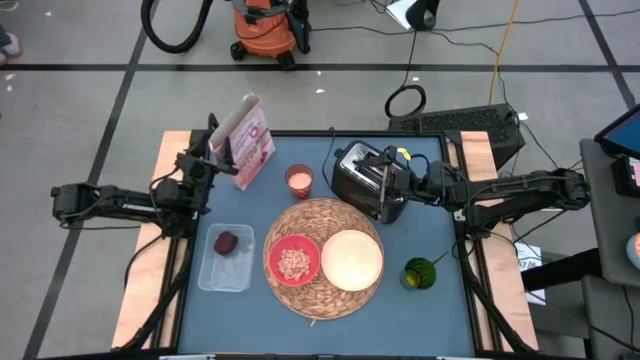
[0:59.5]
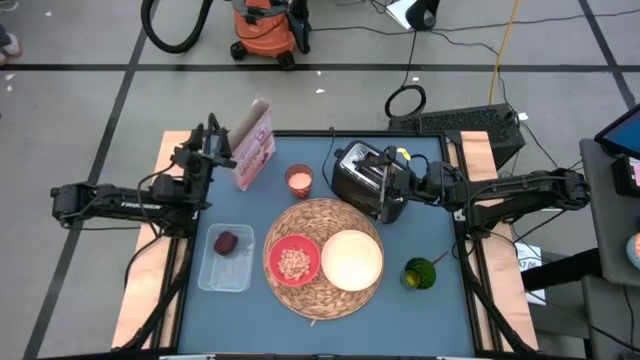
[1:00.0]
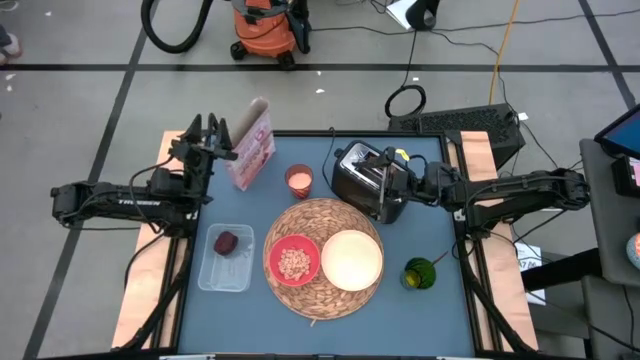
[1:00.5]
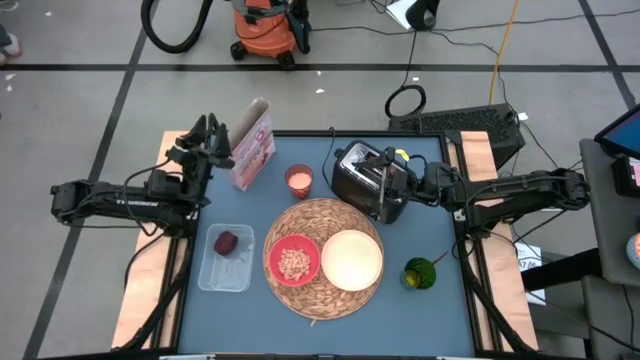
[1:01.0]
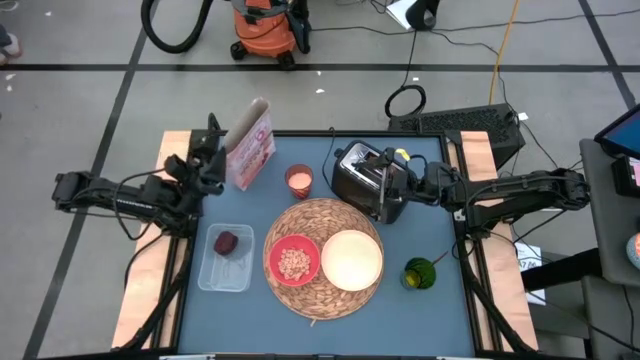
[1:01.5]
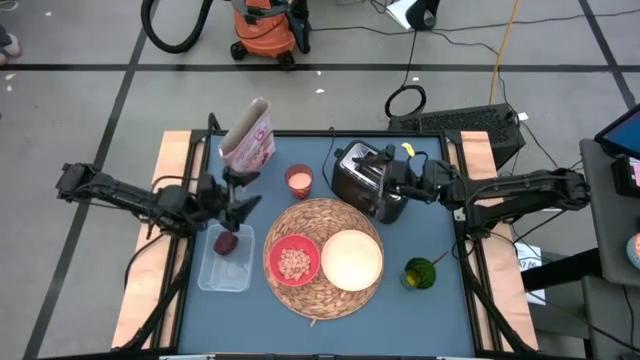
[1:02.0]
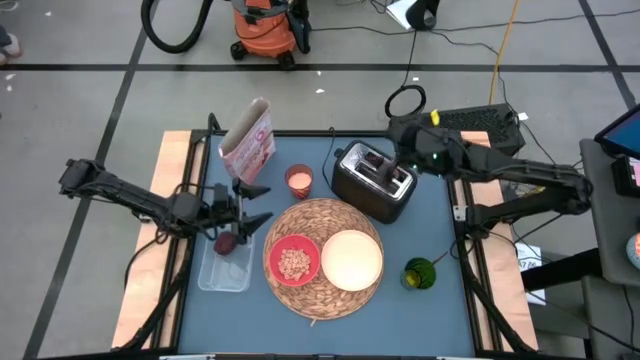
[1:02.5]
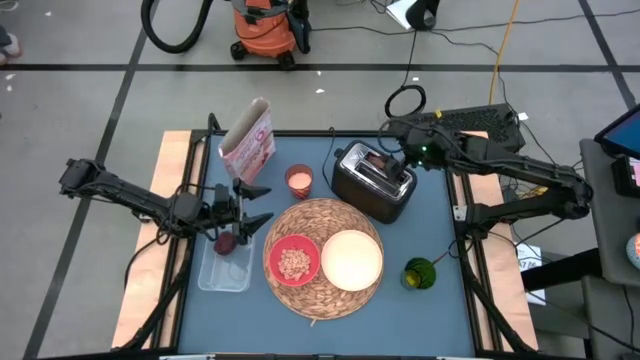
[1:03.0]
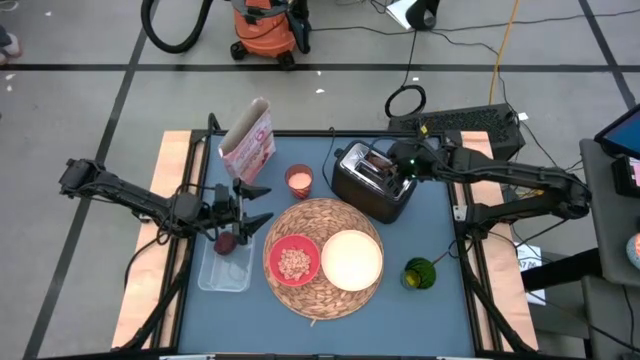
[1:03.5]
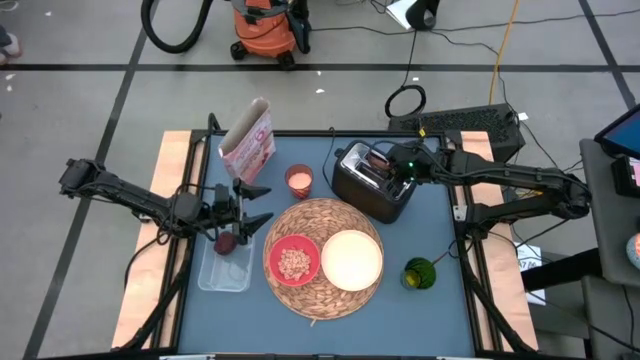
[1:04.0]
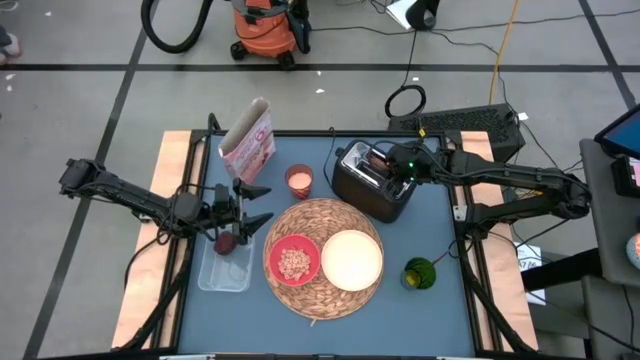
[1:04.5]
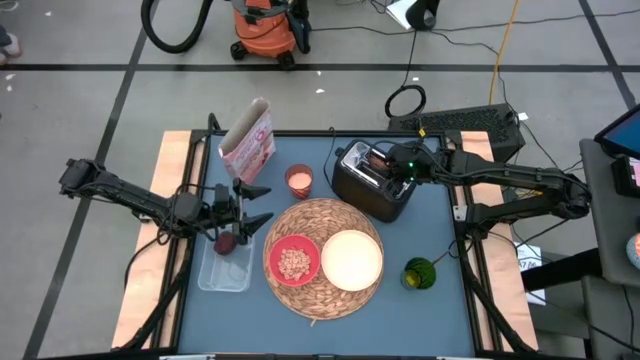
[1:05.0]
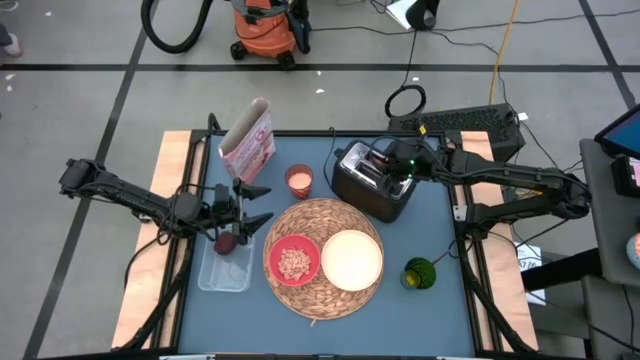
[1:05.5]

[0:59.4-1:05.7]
Task: Arrange a breakfast setting
Put the bagel from the toaster to the white plate

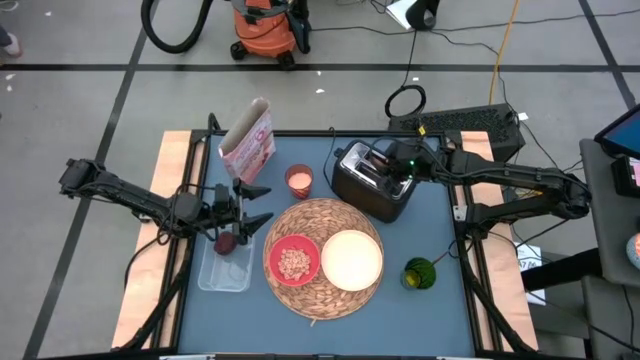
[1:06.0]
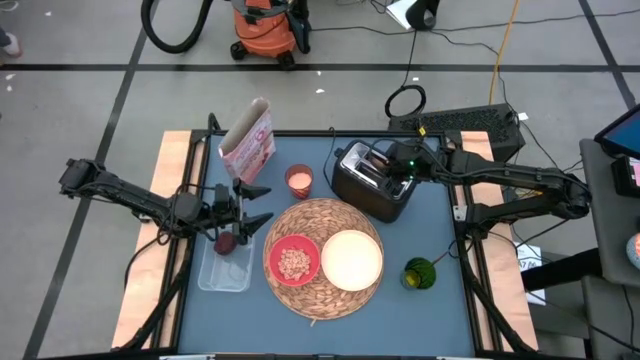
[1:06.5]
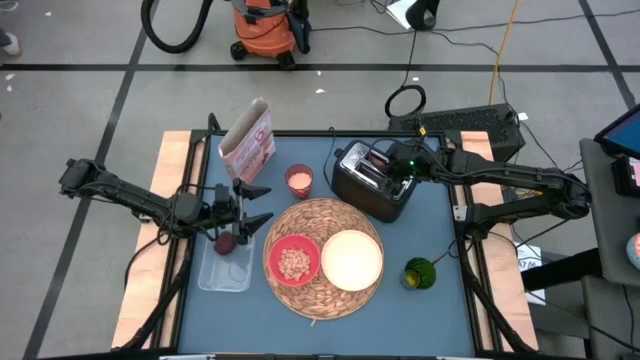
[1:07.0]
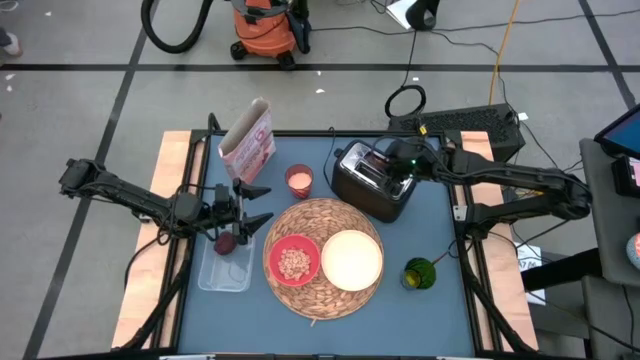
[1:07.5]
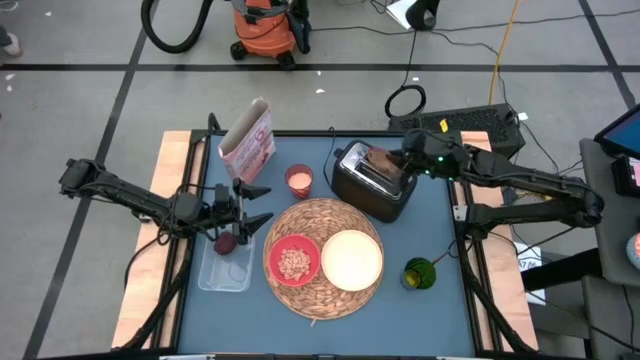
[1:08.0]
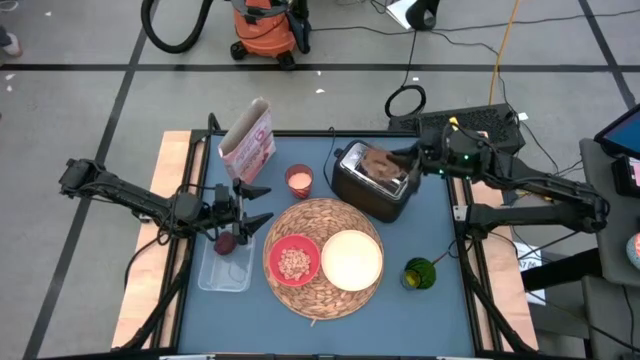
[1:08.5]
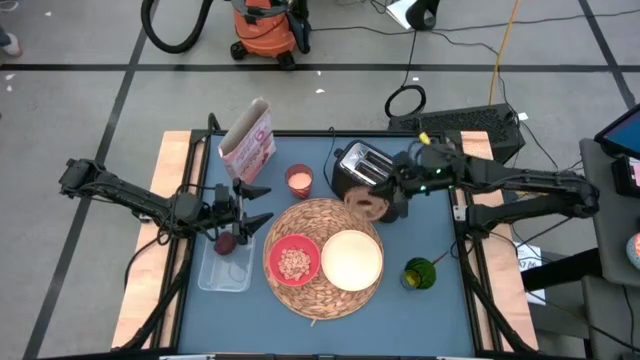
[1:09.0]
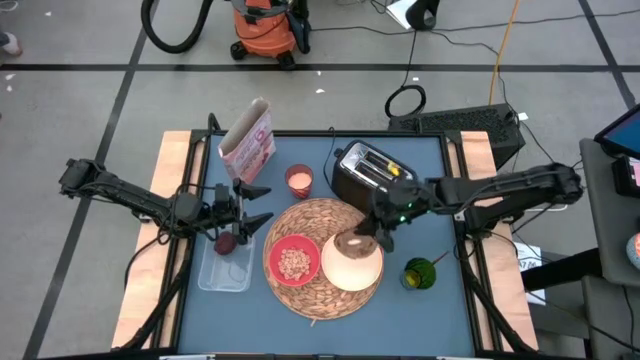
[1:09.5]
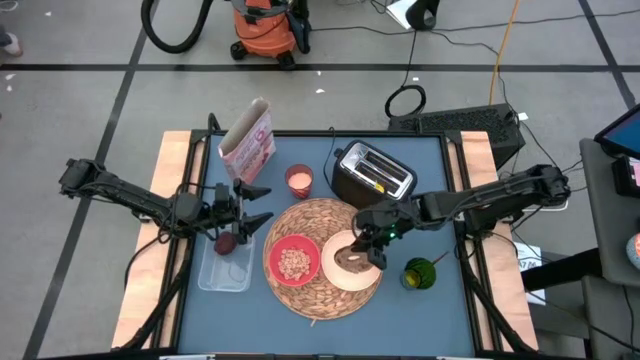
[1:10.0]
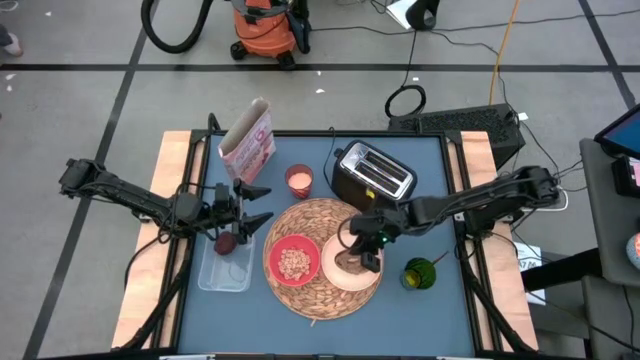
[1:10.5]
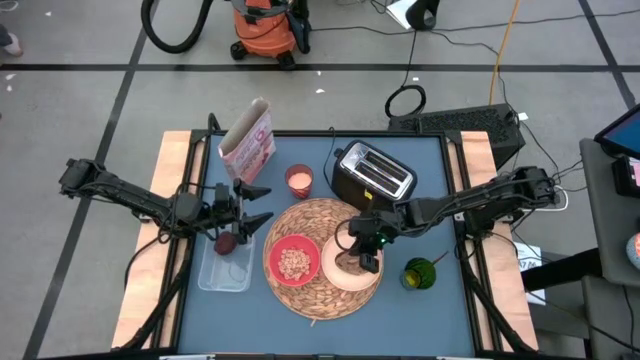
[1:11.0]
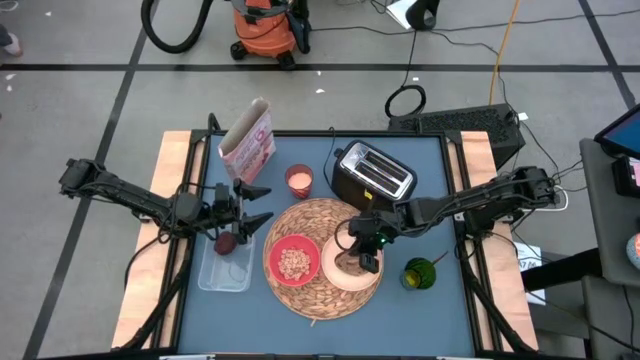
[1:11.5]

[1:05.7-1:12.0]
Put the bagel from the toaster to the white plate
